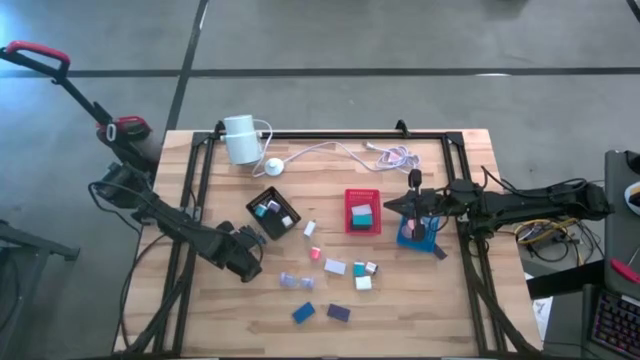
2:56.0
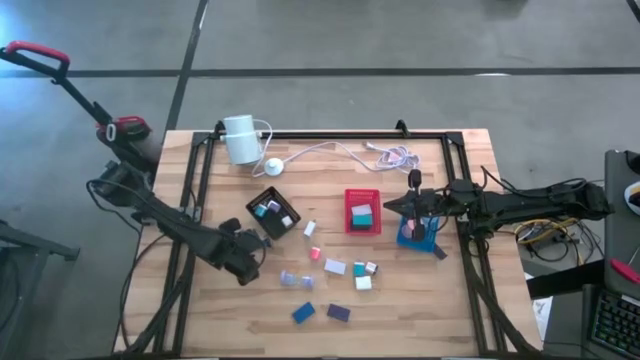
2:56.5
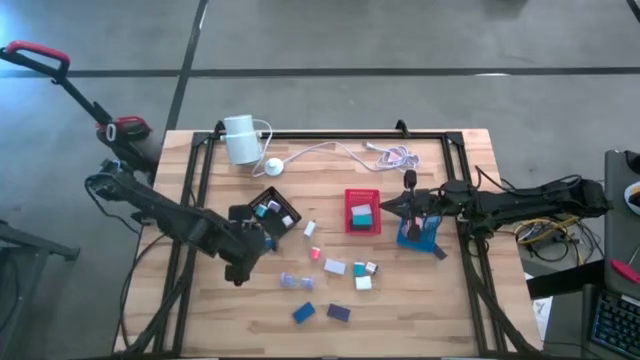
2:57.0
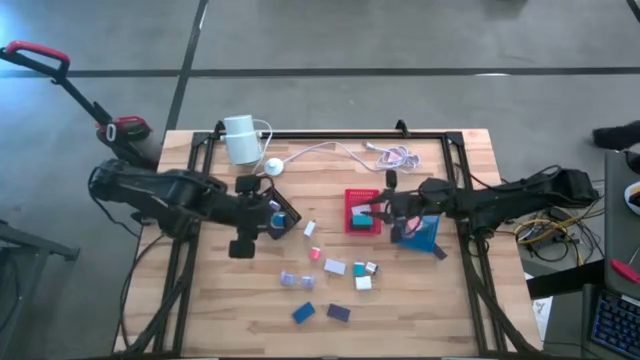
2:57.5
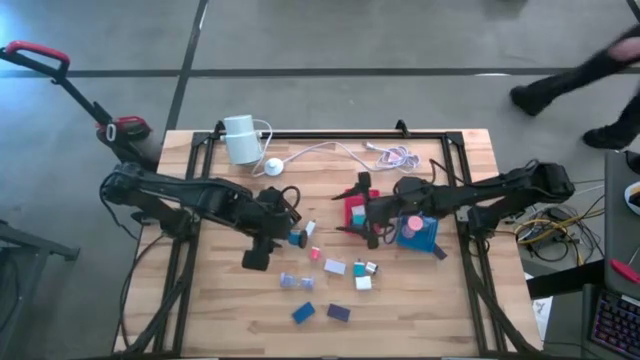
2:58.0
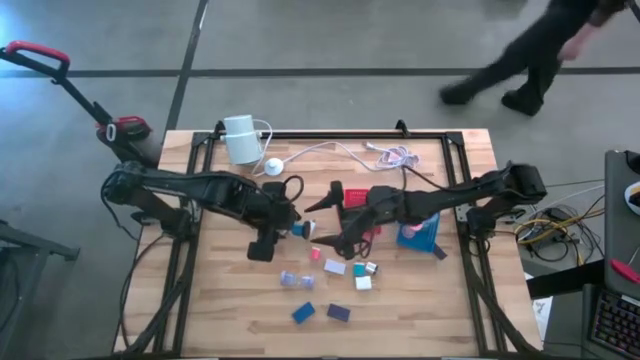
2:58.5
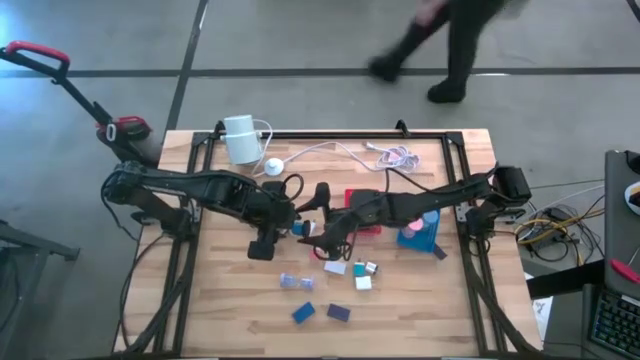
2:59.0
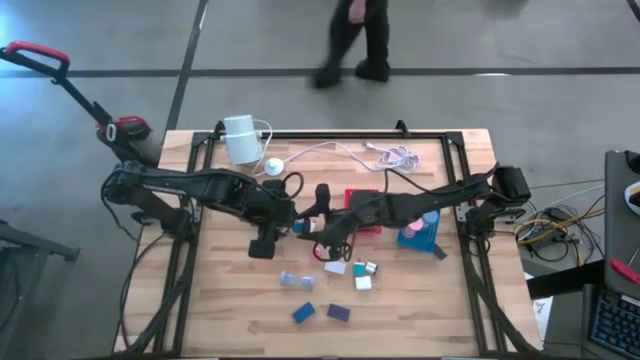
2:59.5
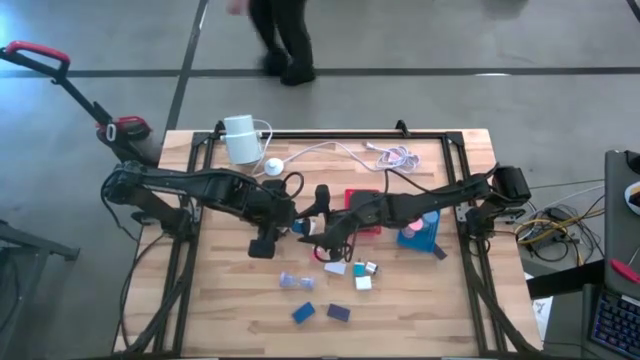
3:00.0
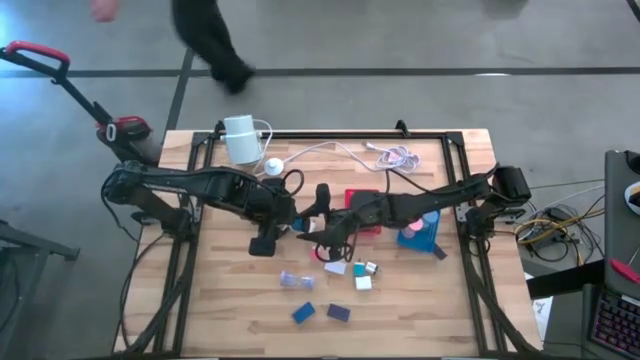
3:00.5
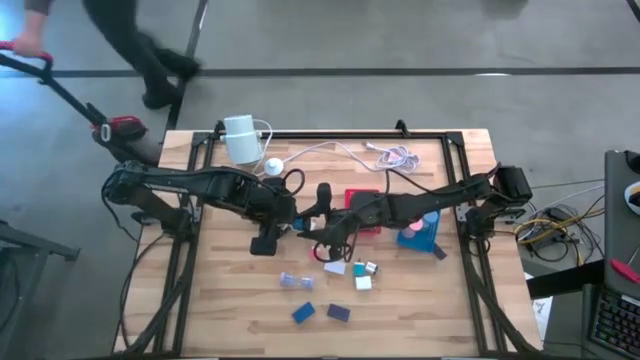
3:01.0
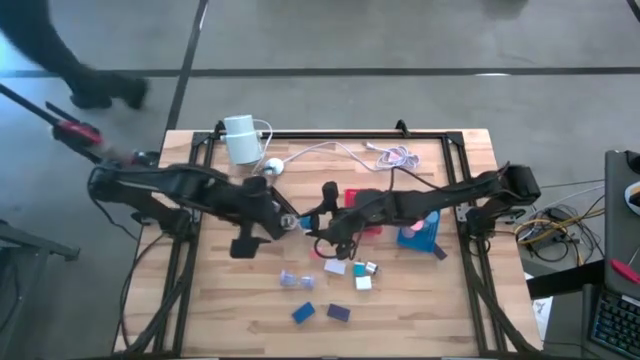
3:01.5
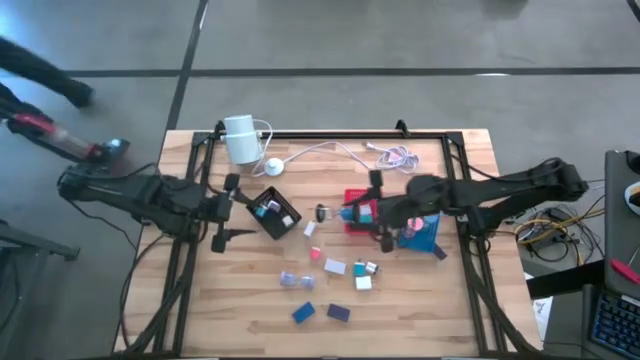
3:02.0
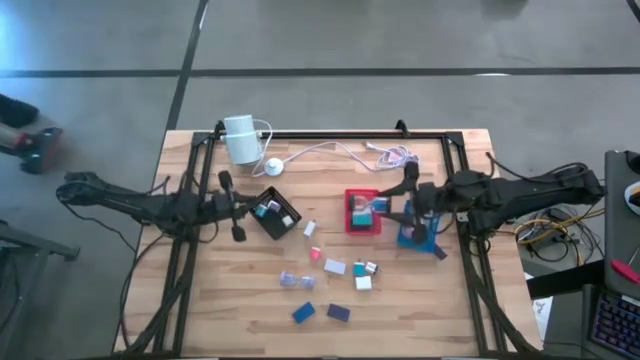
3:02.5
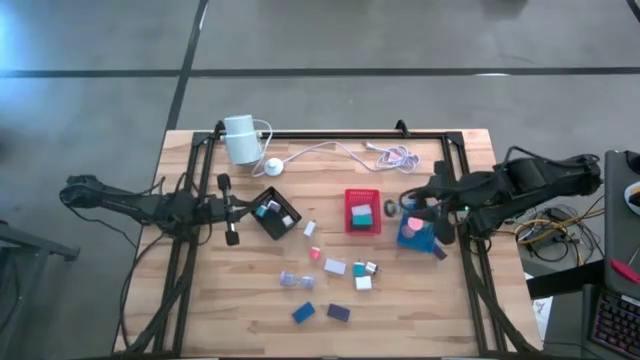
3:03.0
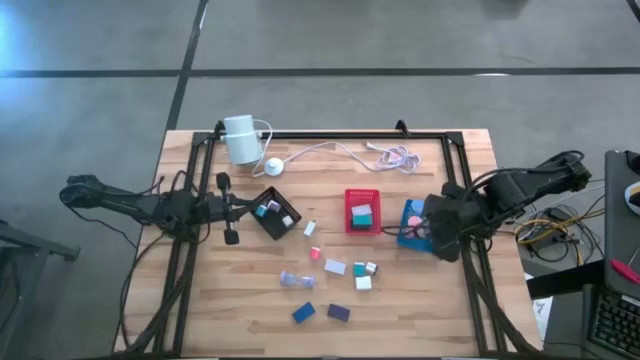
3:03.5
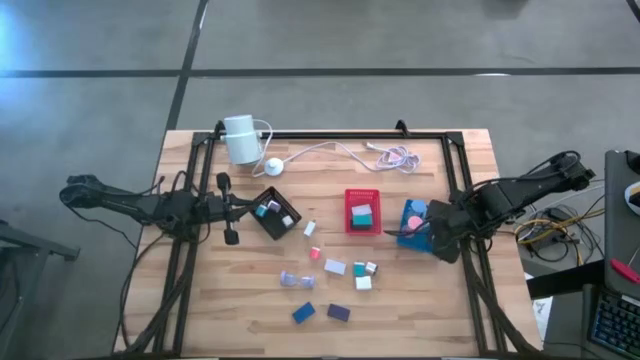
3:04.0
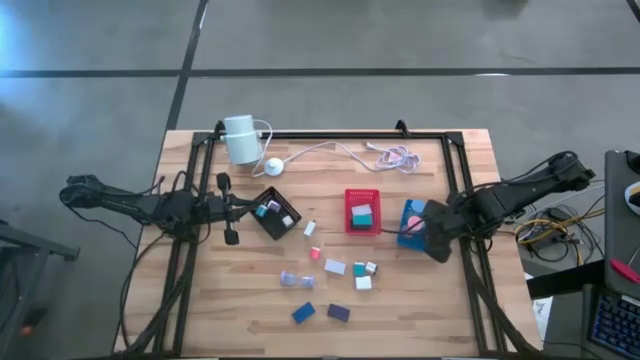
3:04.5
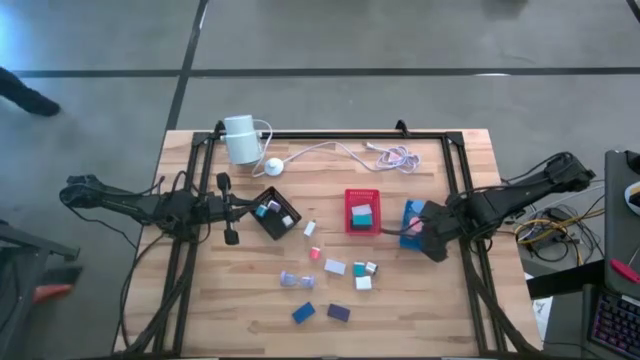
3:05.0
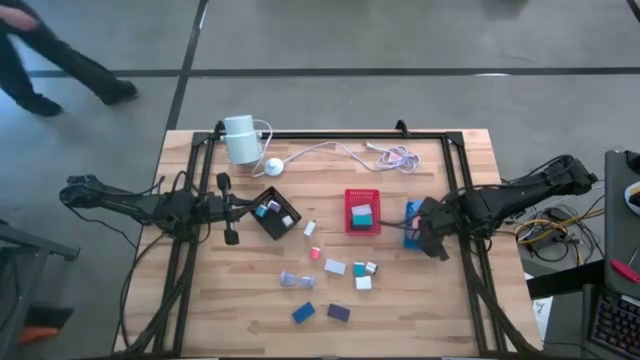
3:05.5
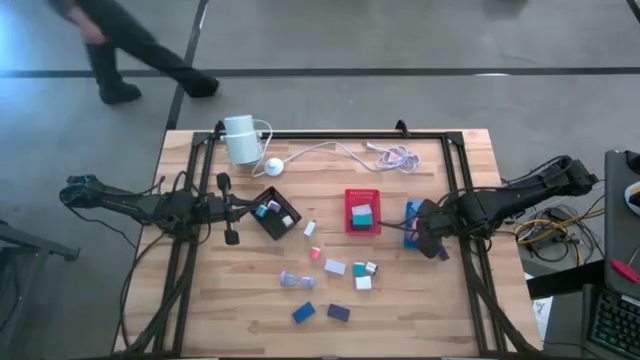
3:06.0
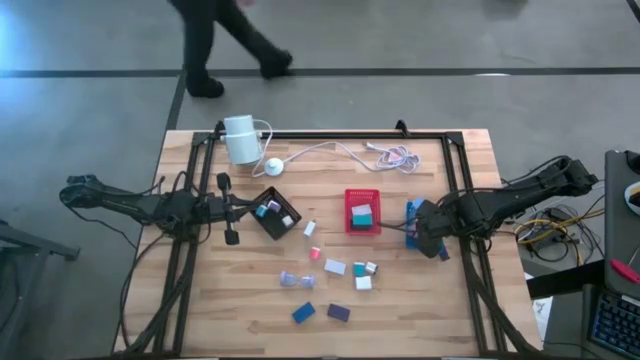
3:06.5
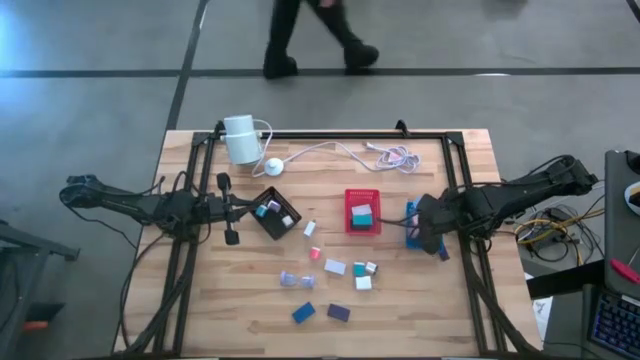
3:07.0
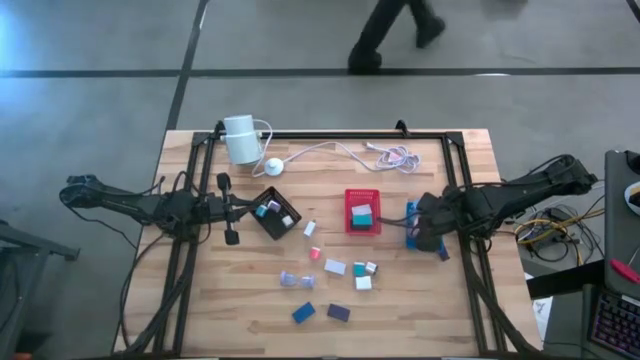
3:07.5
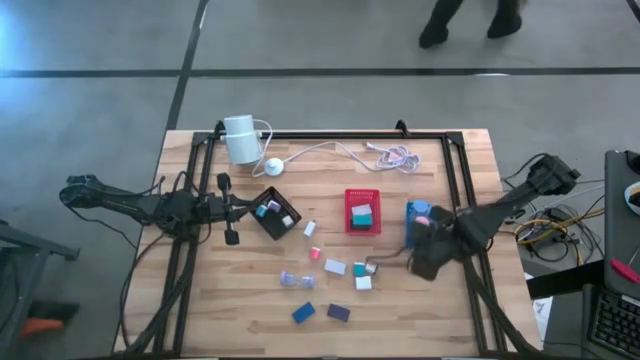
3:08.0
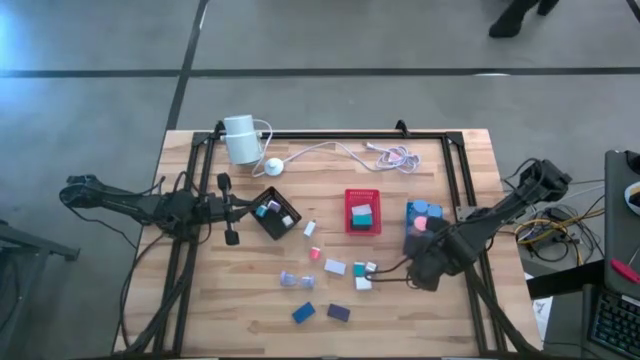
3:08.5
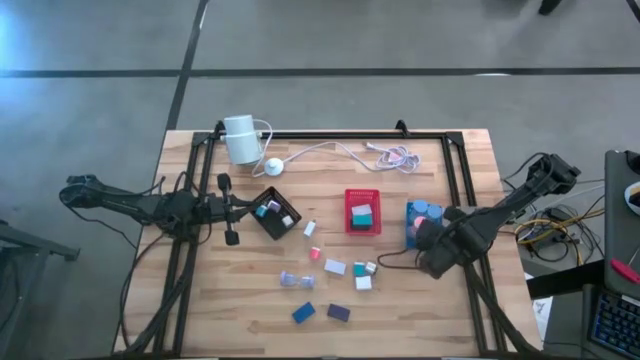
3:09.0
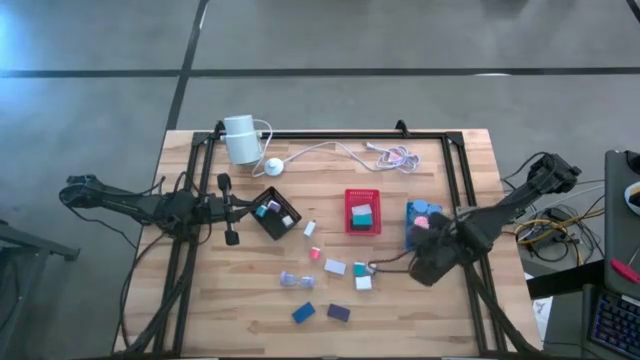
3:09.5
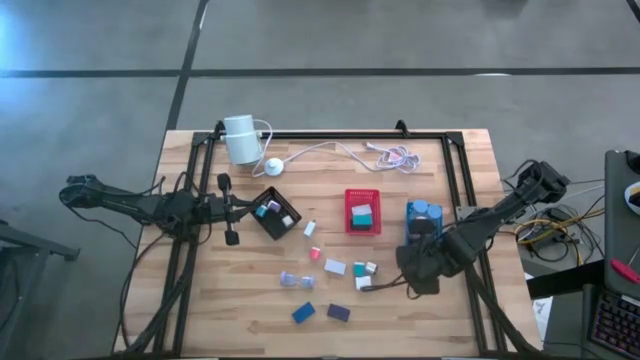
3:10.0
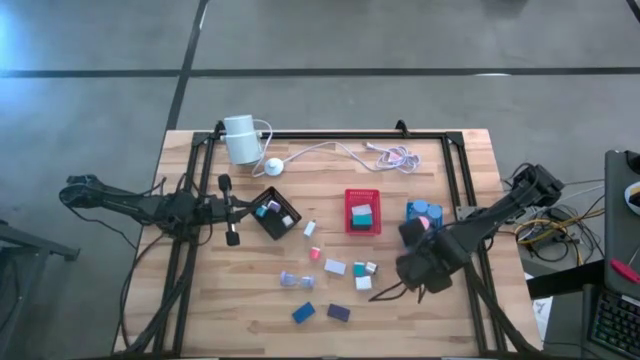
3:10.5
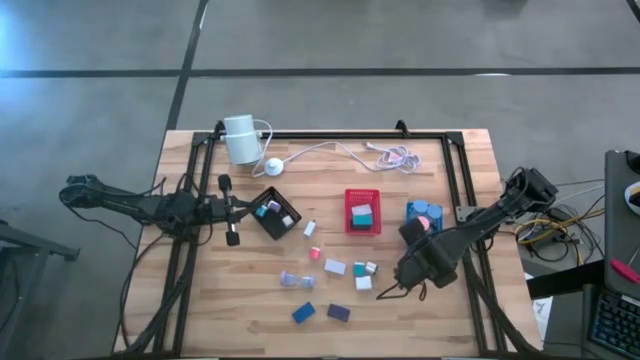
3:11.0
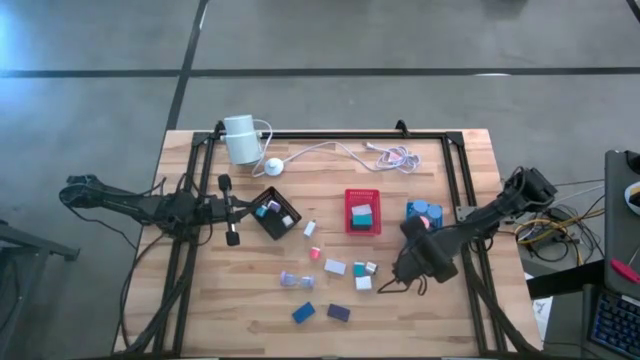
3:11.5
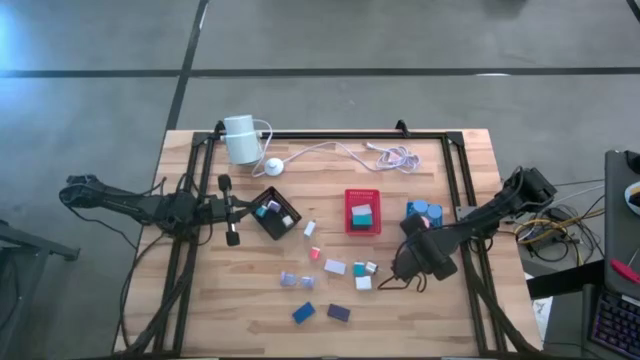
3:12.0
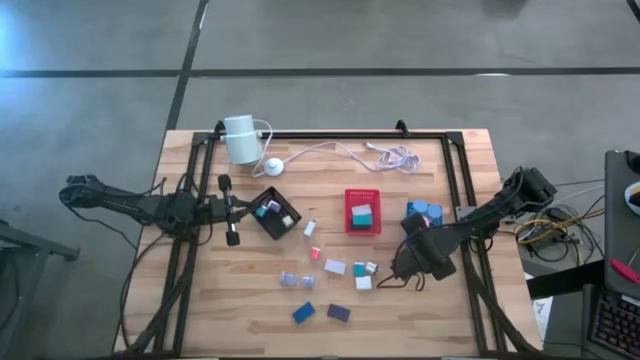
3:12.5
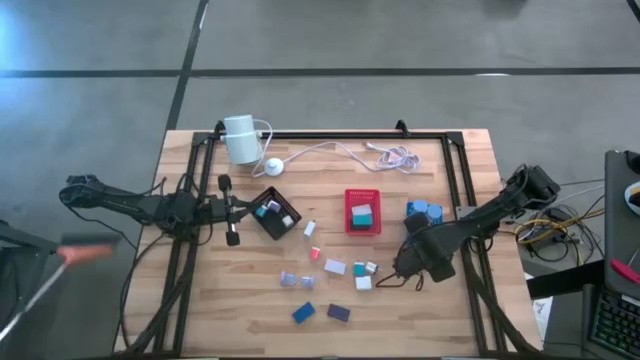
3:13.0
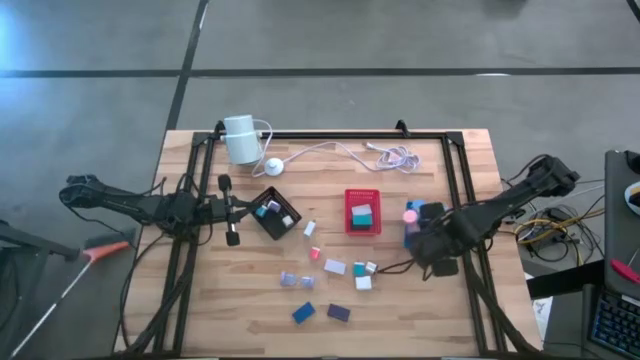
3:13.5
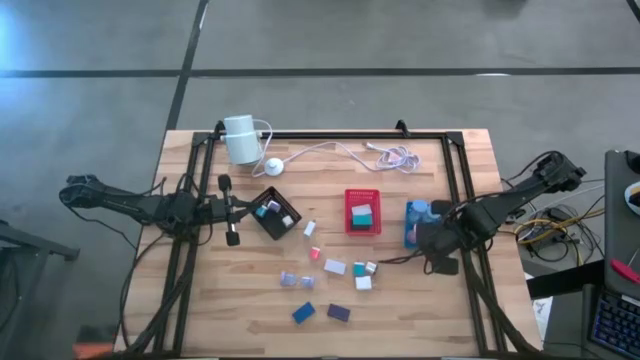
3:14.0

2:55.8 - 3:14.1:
Task: Pick & Place Office items
Put the black hourglass into the blue bin
